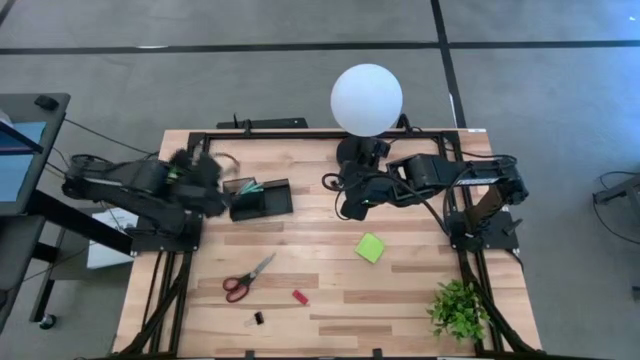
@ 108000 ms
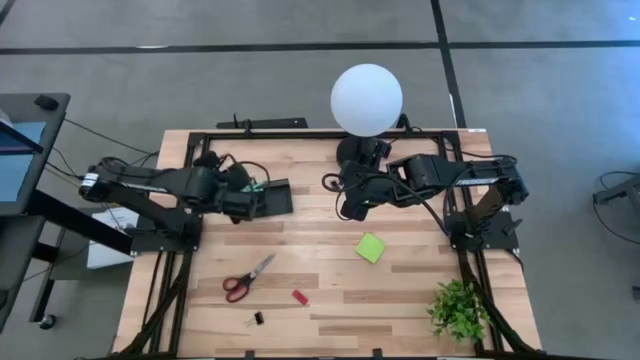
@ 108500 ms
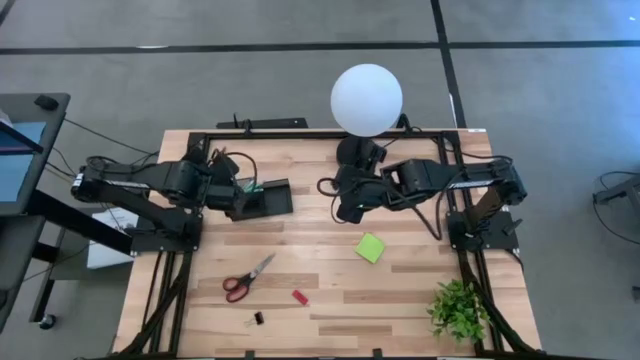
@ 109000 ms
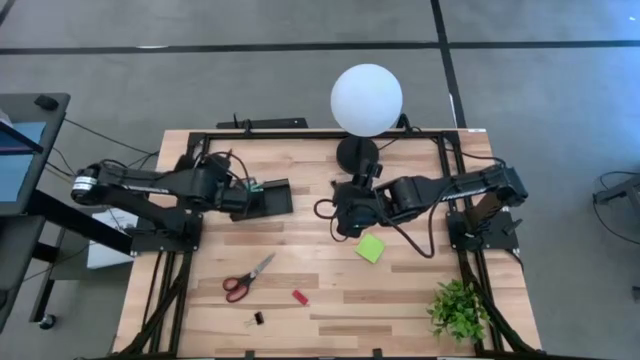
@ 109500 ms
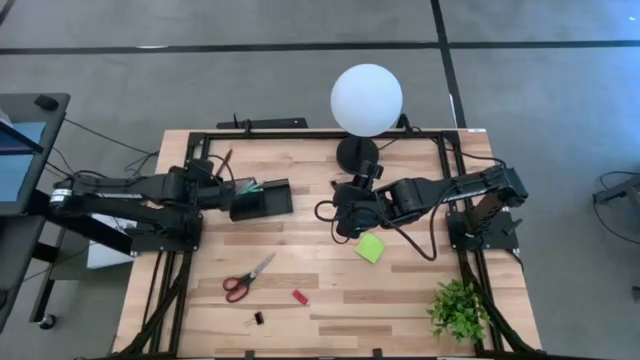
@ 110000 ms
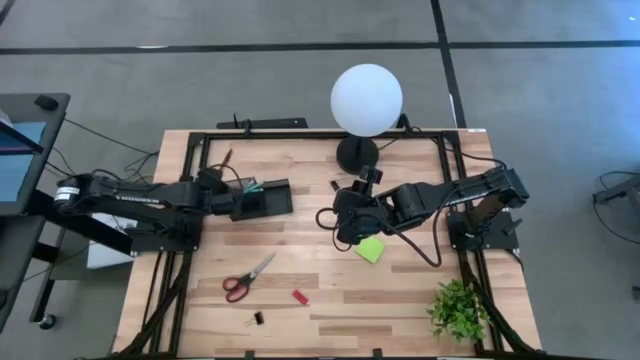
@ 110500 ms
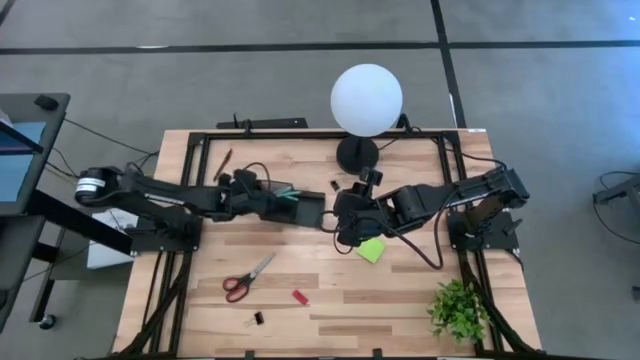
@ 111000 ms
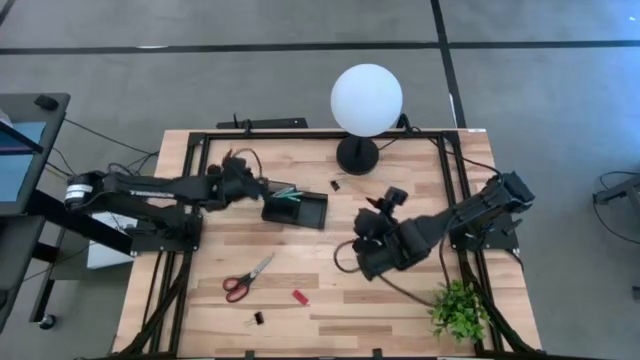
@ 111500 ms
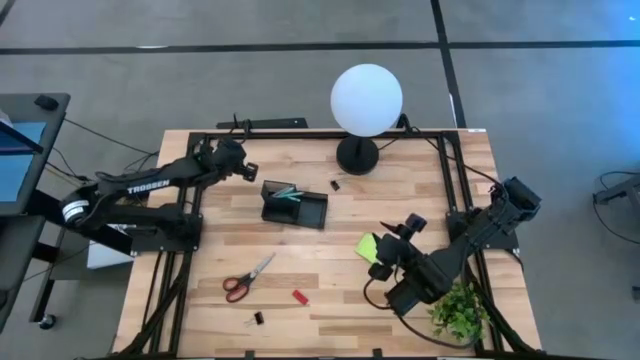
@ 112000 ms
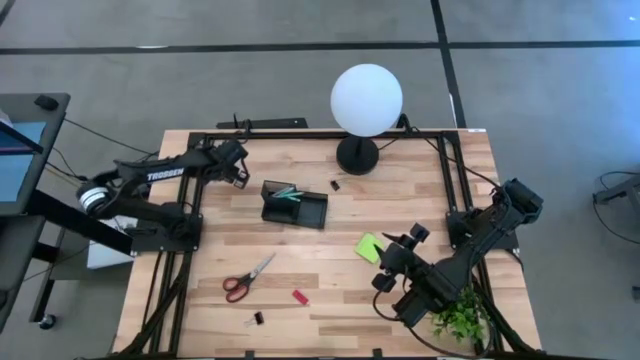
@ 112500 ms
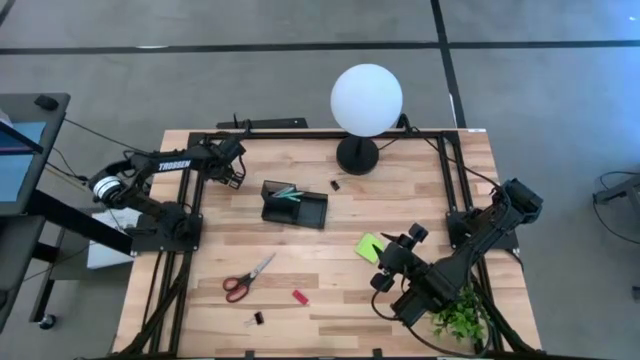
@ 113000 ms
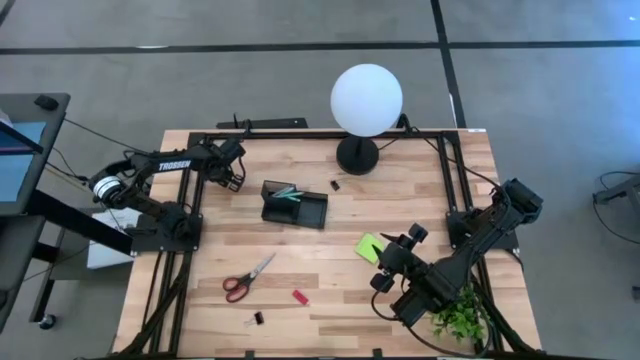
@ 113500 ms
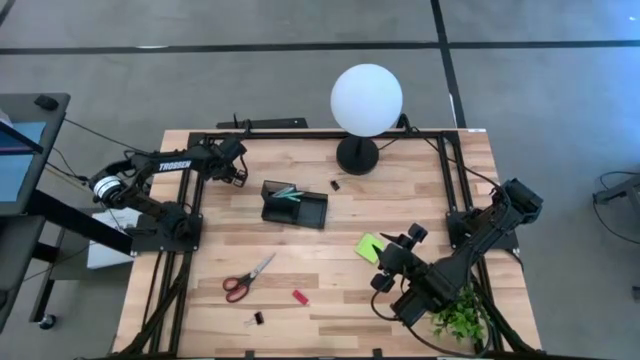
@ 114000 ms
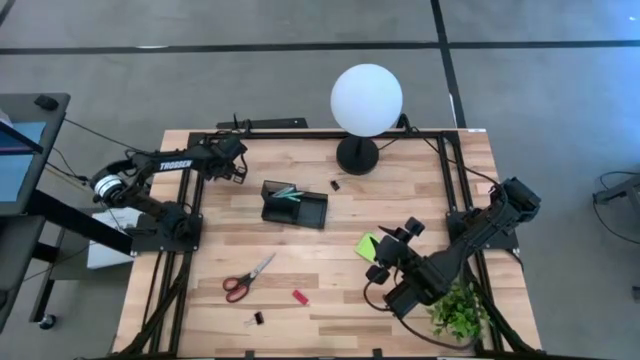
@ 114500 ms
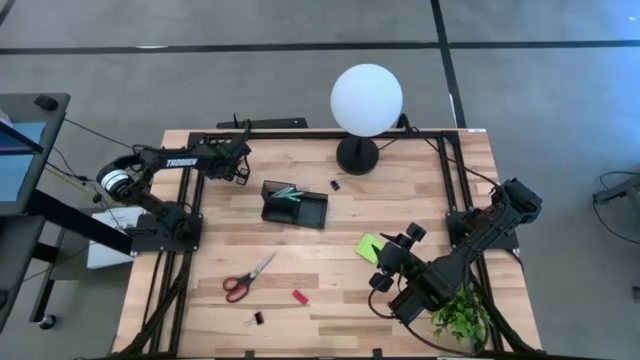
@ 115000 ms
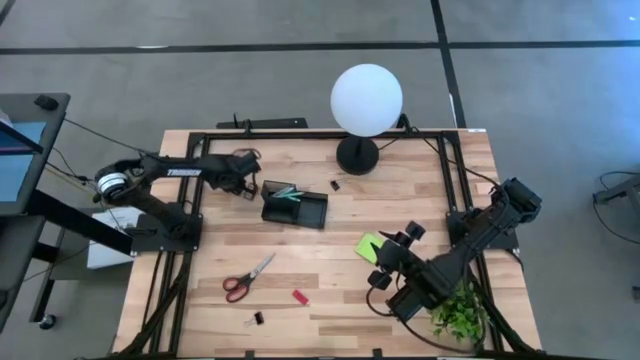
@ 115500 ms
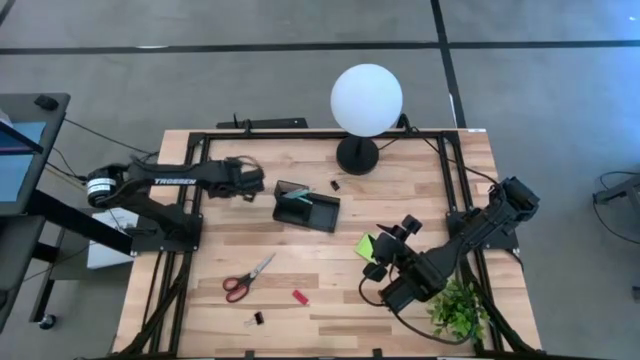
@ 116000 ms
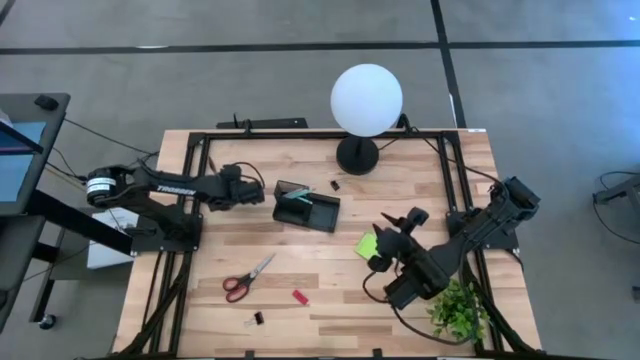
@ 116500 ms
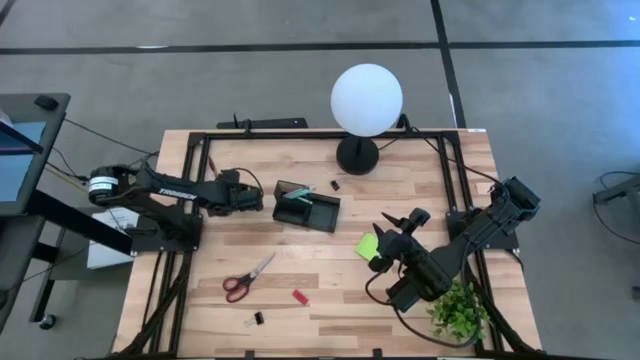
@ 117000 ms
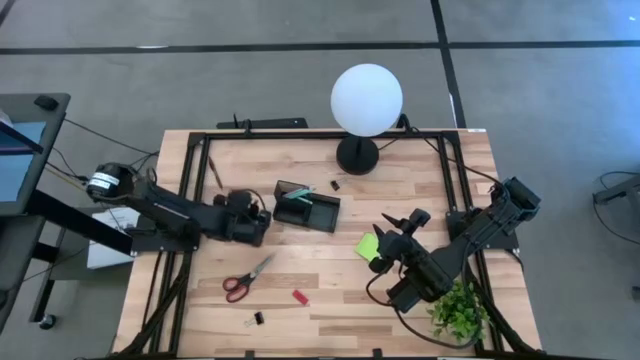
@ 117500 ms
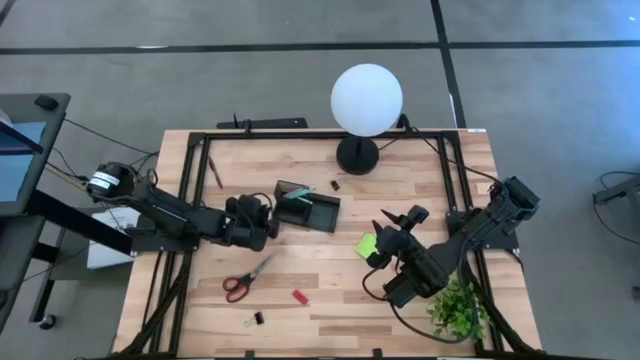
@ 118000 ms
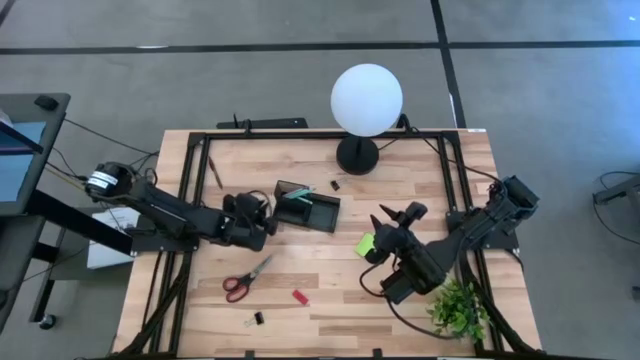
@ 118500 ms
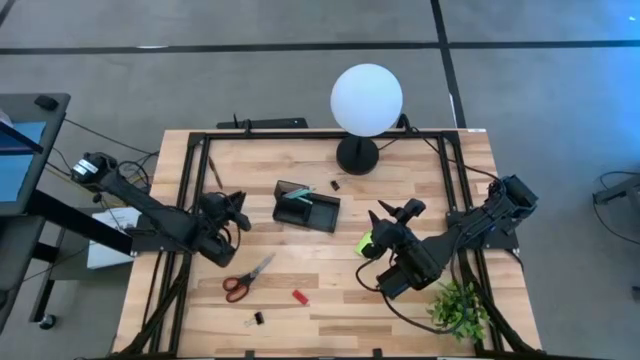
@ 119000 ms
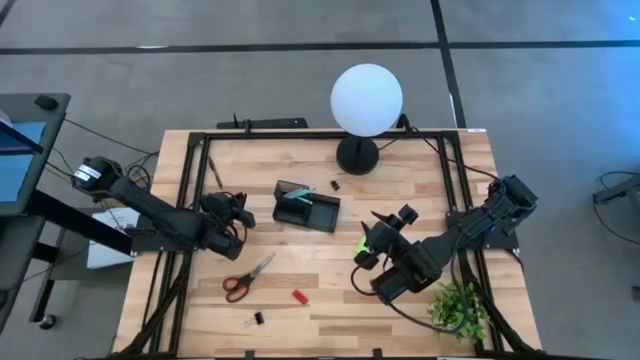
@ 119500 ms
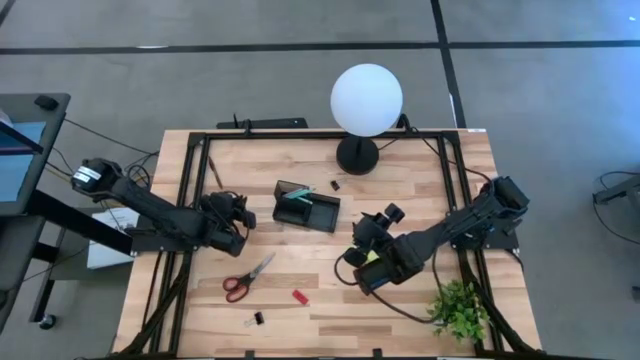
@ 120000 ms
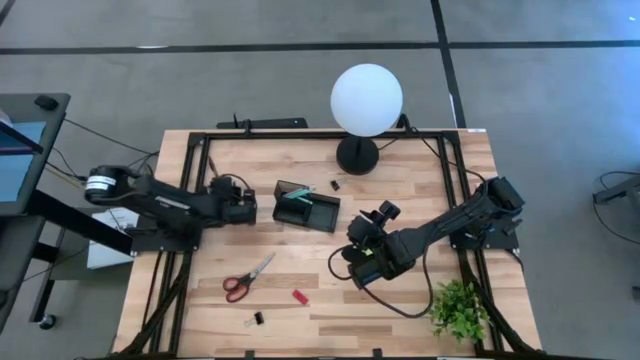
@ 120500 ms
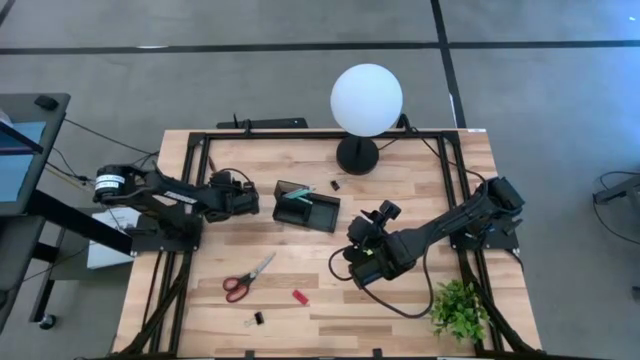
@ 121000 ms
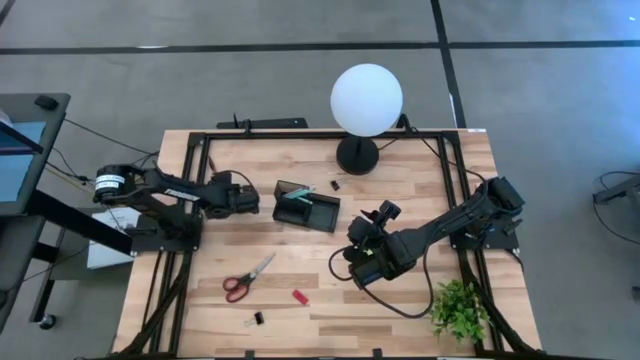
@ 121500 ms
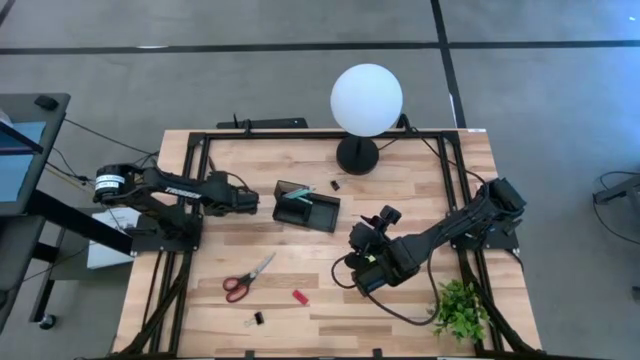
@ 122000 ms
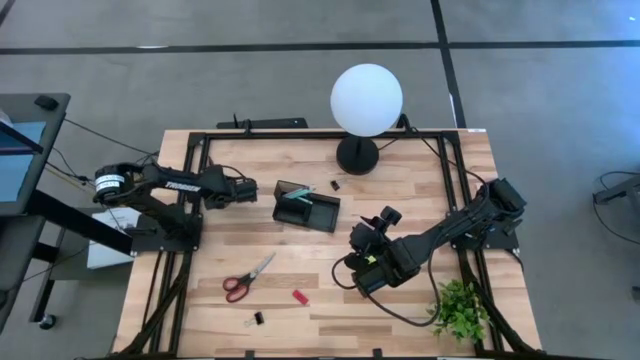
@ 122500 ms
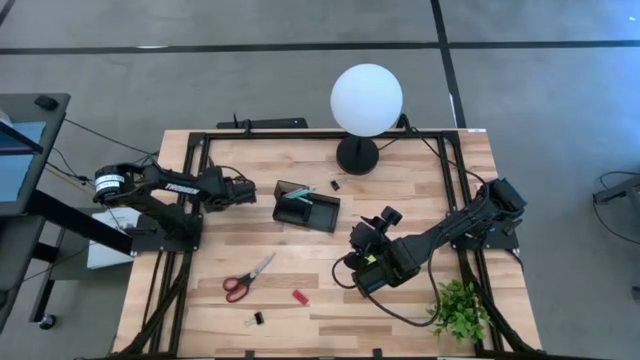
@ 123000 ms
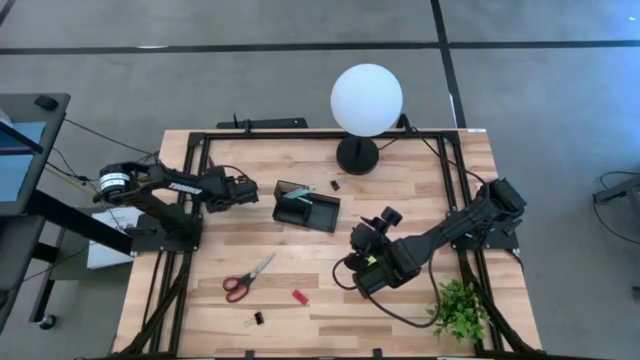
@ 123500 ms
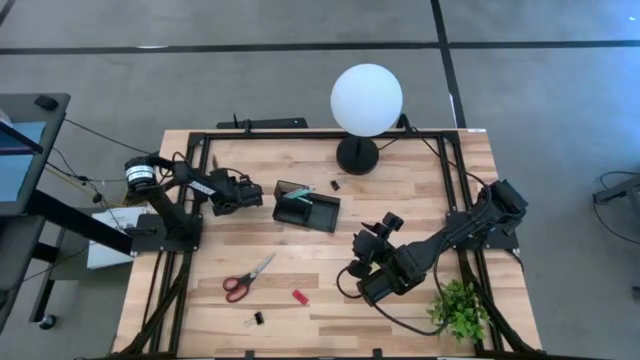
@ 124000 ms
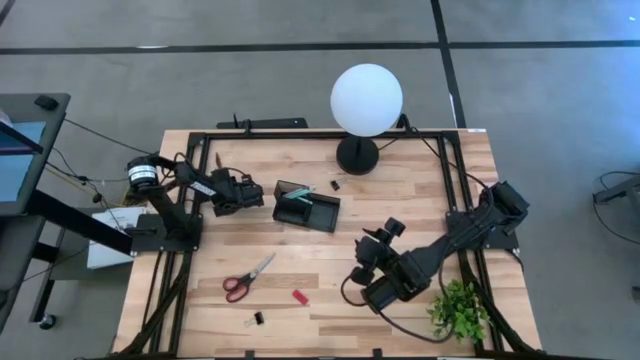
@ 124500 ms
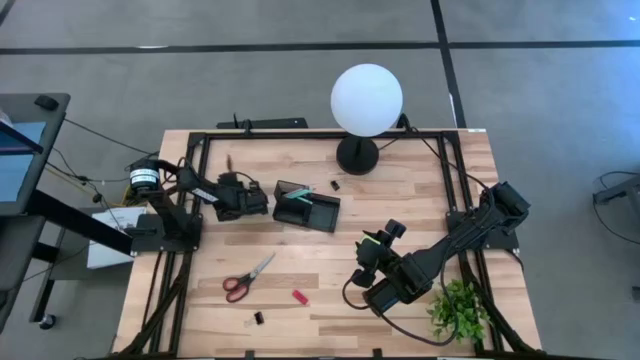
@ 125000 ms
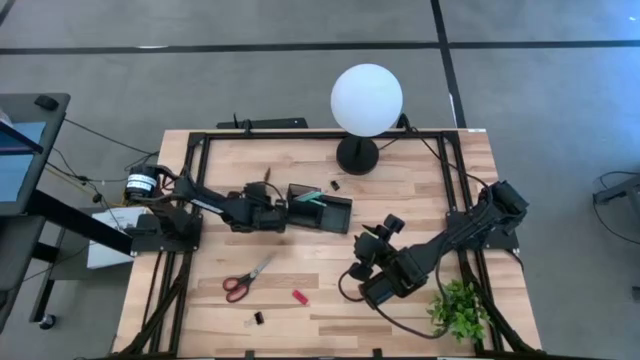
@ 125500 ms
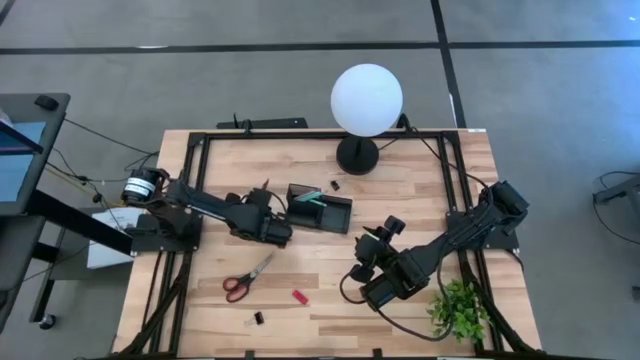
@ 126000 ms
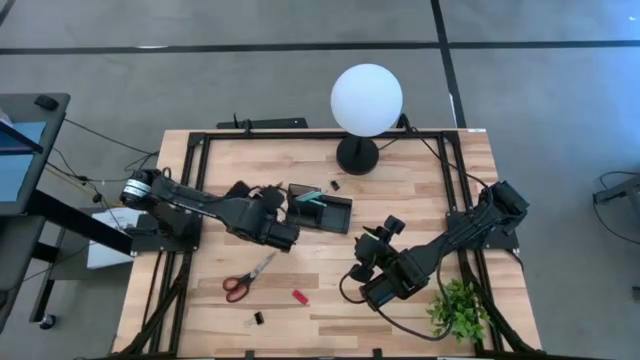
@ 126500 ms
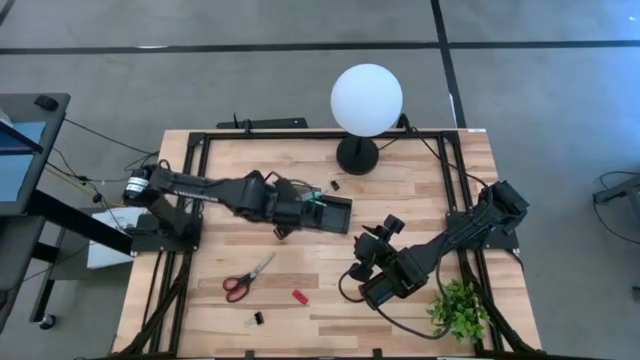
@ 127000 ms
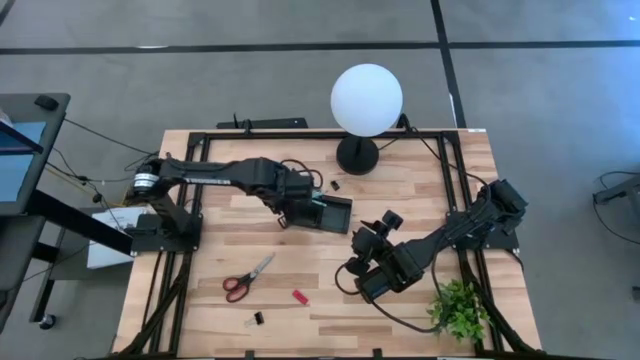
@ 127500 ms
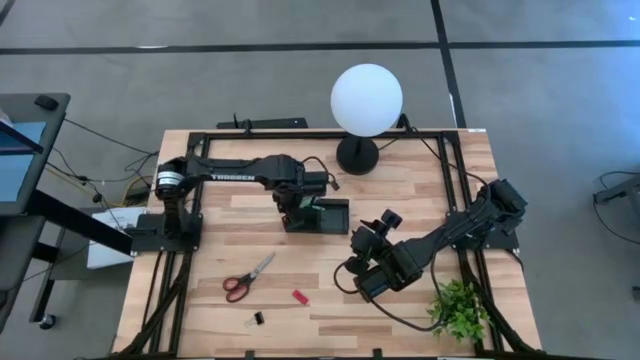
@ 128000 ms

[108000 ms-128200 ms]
Task: Pick and place office supplies into organizer
Put the brown pen into the black desk organizer

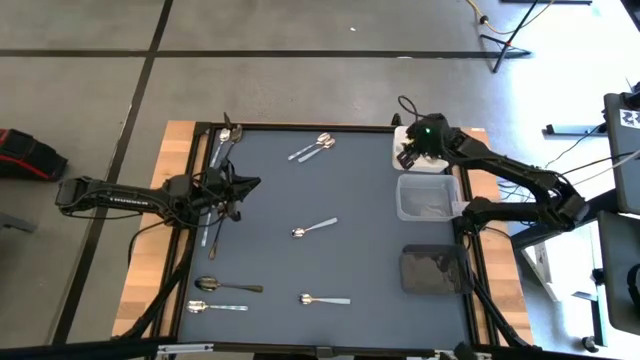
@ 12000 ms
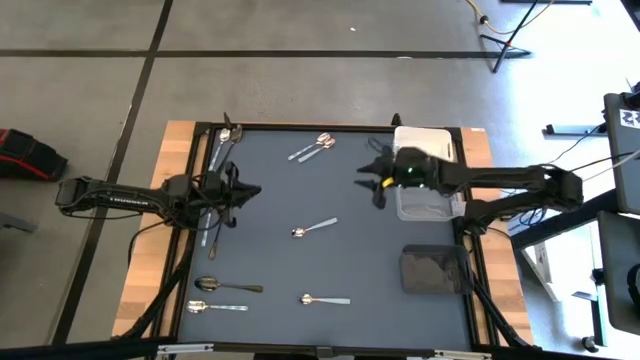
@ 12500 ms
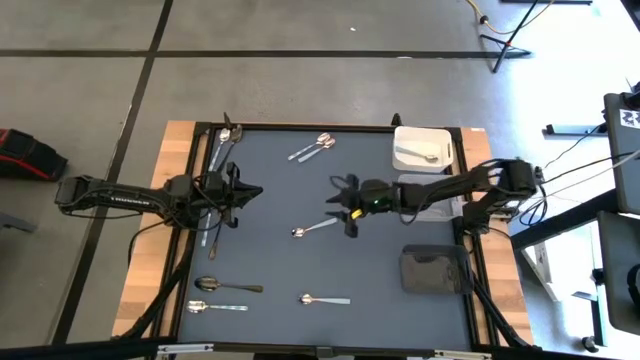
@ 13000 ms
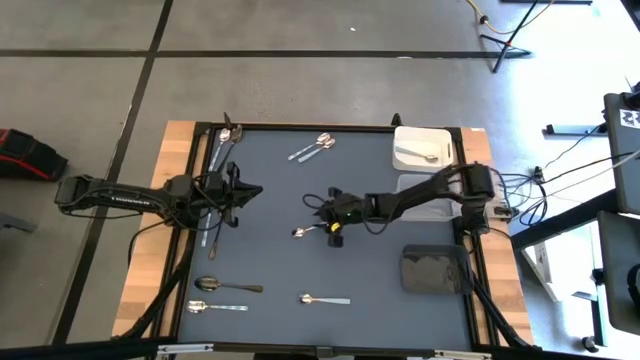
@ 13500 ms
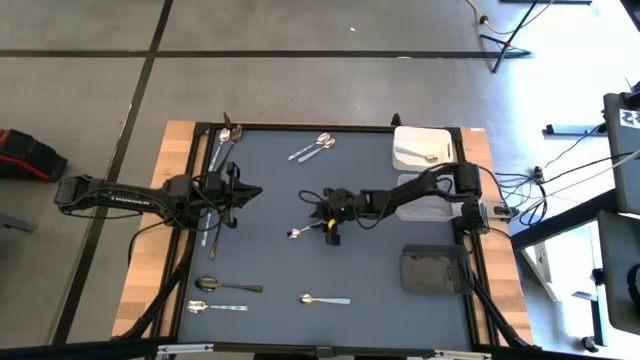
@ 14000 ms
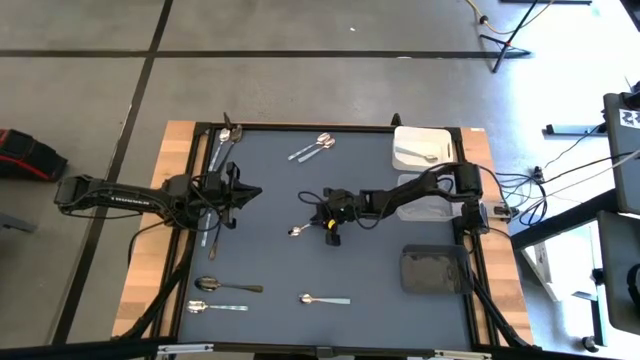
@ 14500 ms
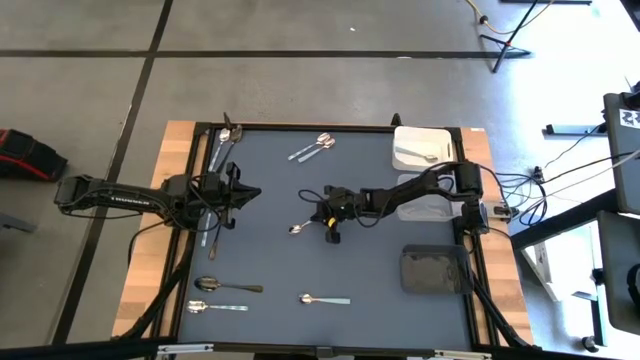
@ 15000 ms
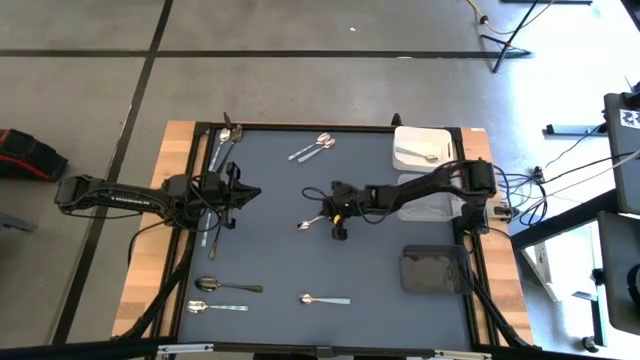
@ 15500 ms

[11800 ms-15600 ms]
Task: Sort silverware by color (type)
Put the light blue spoon into the white bin
